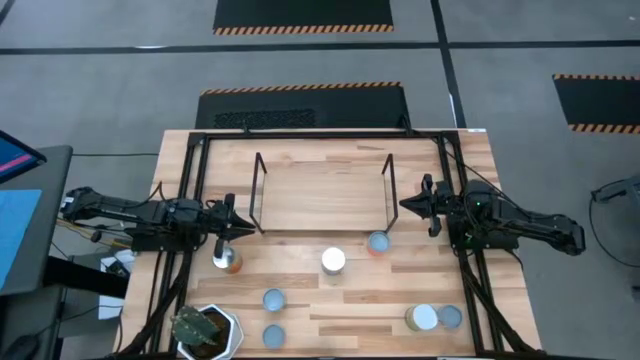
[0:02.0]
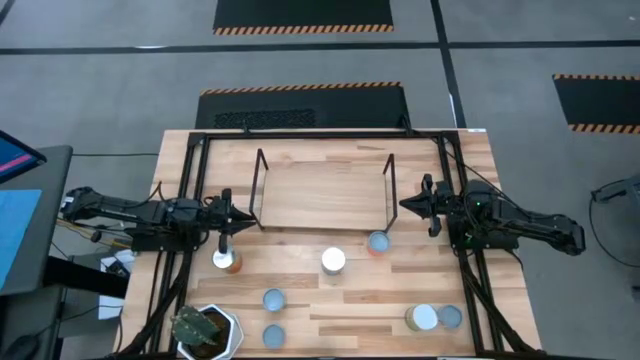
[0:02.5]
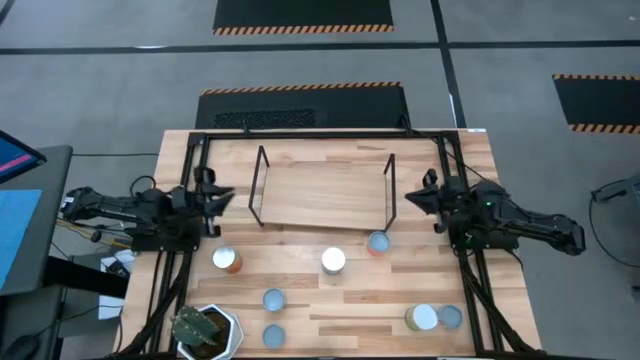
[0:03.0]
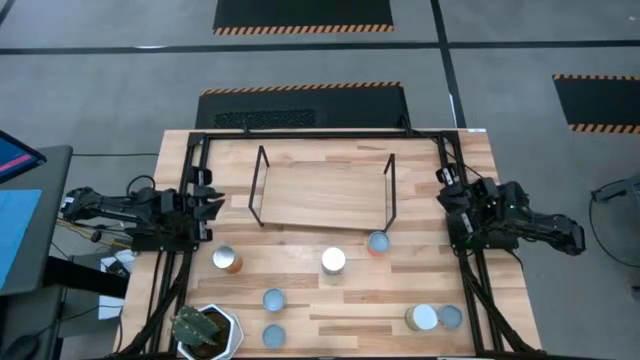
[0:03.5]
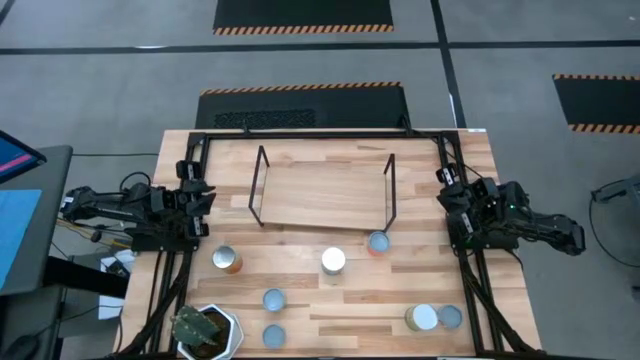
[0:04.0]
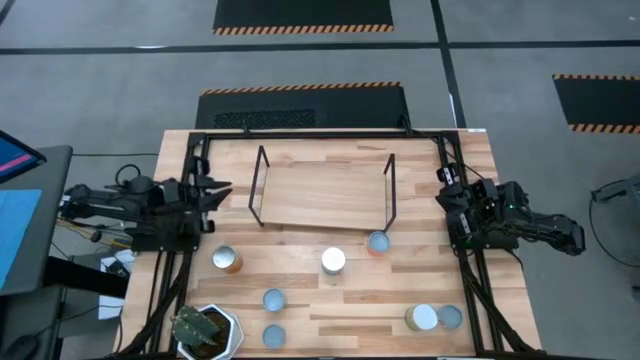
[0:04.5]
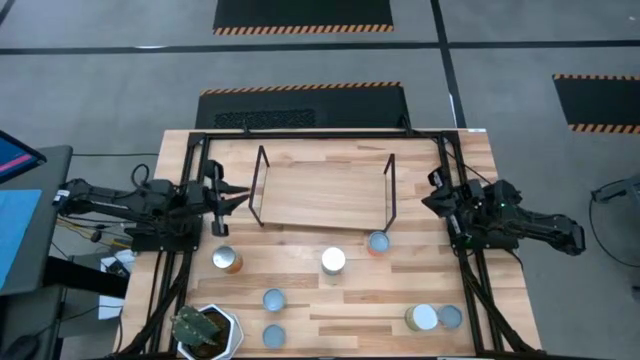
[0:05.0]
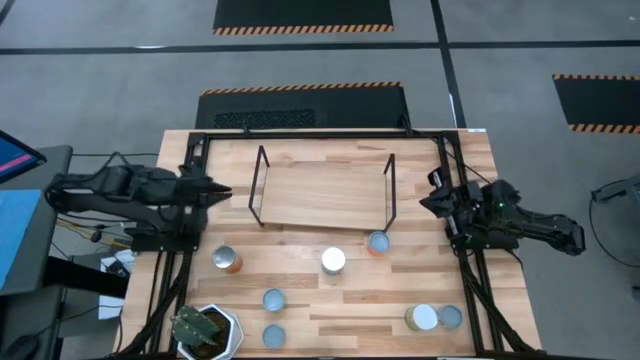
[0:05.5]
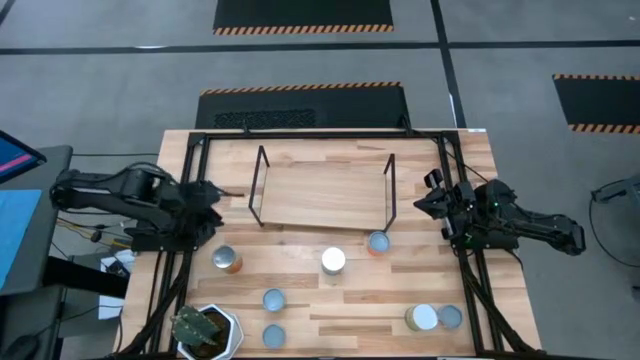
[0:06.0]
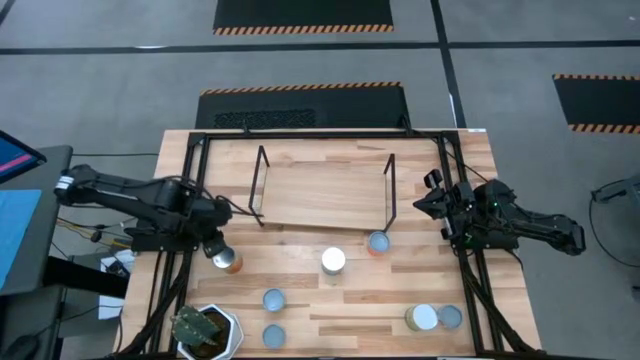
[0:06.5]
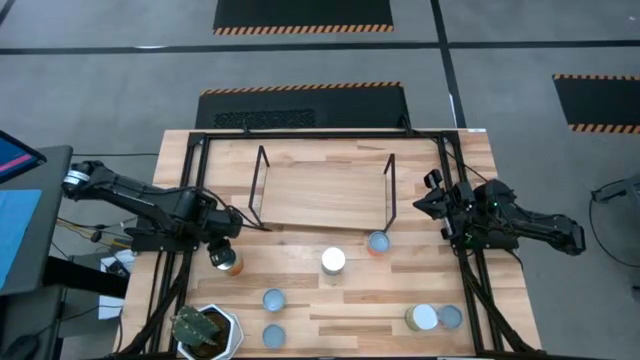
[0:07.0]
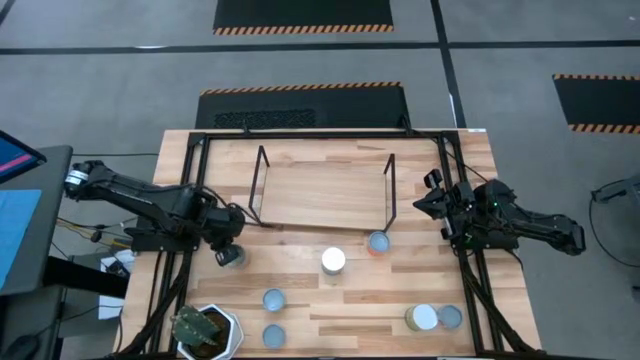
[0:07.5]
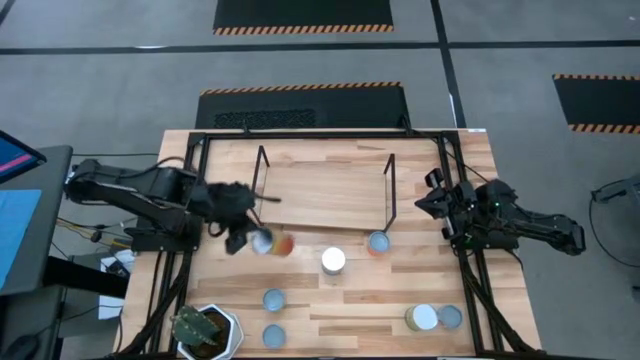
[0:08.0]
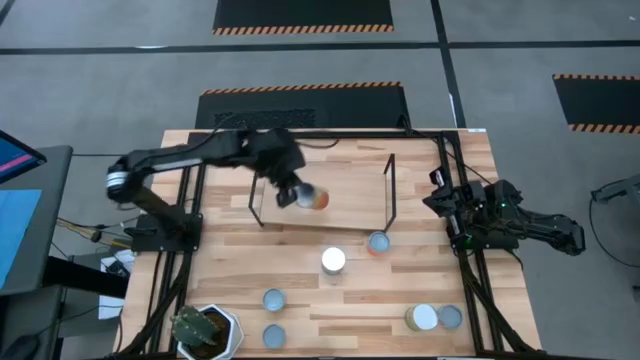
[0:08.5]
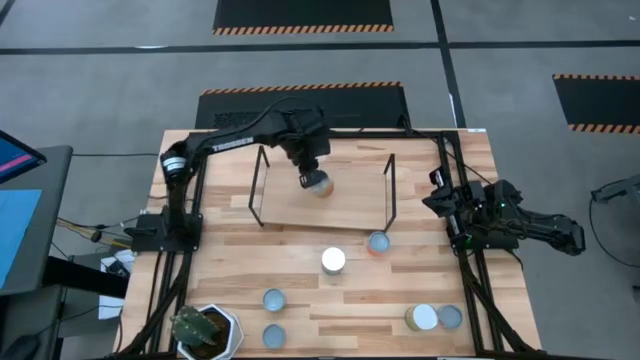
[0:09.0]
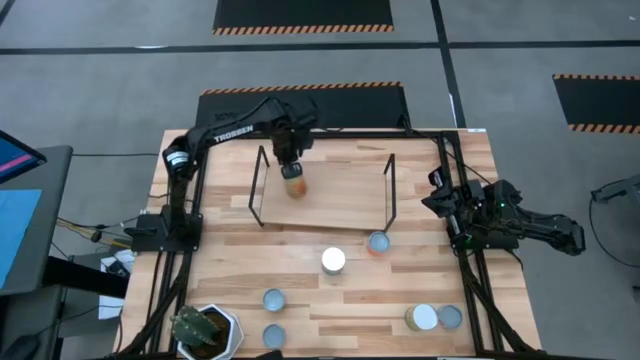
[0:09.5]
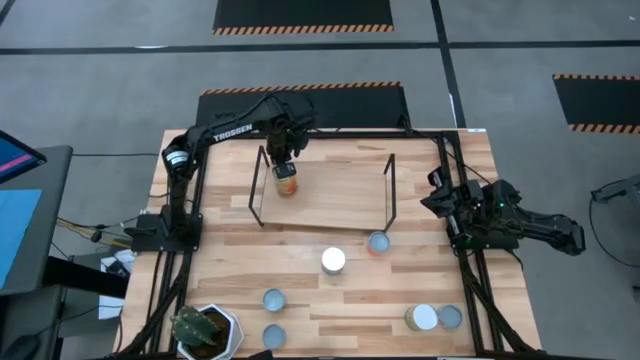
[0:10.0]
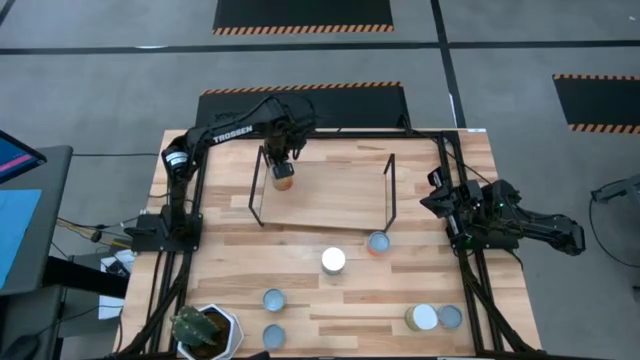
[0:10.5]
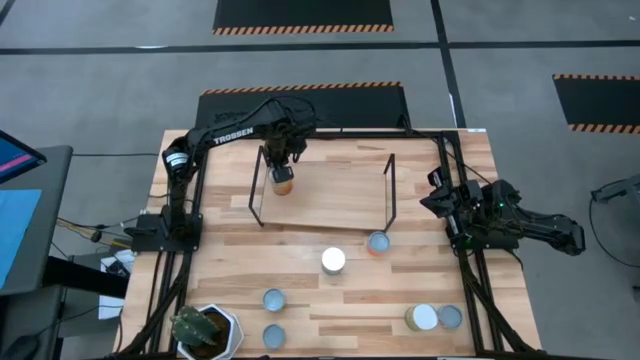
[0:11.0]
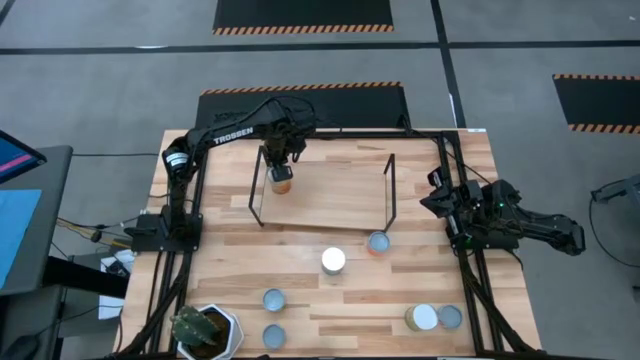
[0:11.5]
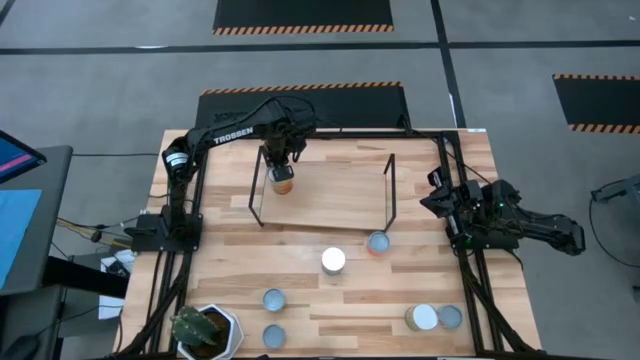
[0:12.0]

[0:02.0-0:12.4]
Task: Pick and place cans onto a shelf
Put the canned green beans on the shelf

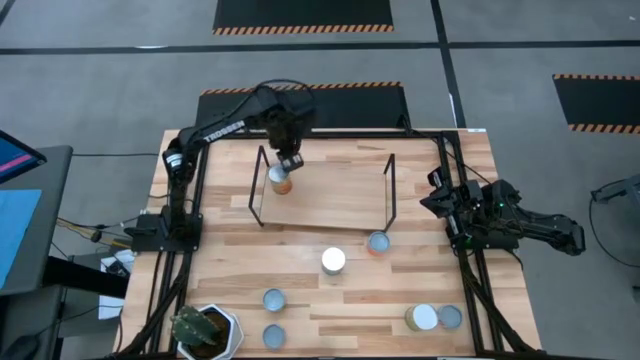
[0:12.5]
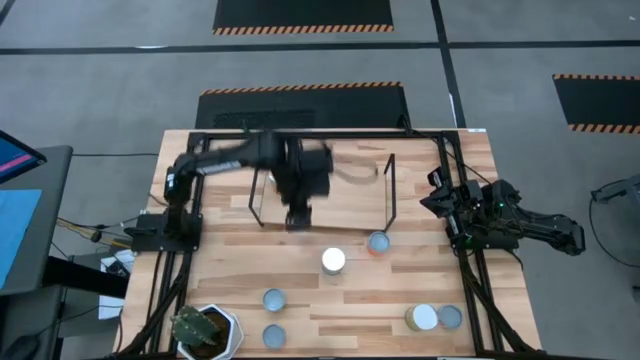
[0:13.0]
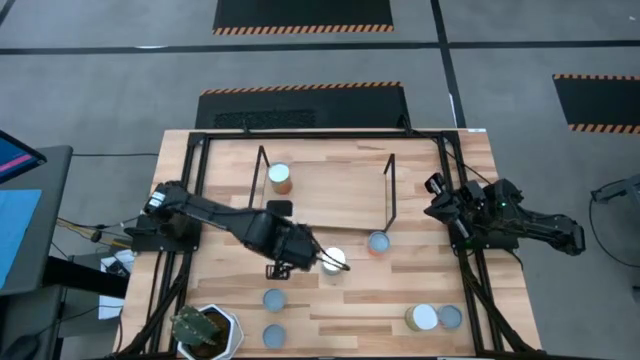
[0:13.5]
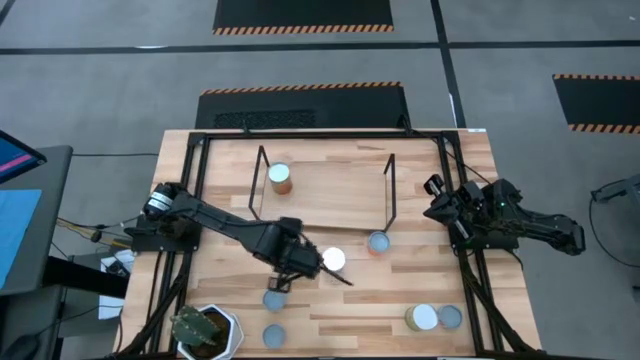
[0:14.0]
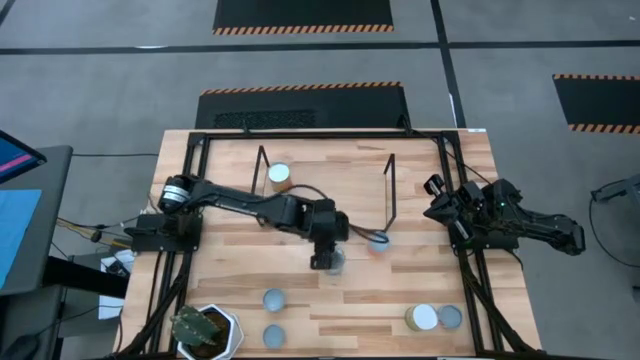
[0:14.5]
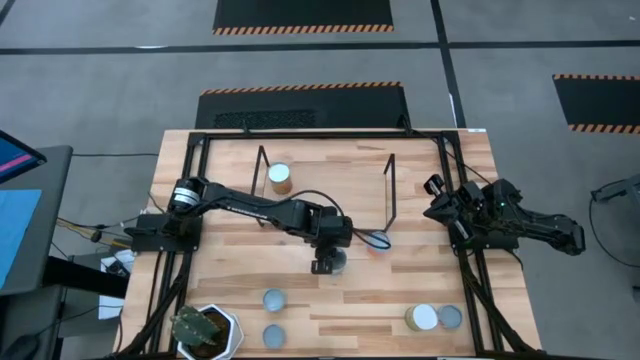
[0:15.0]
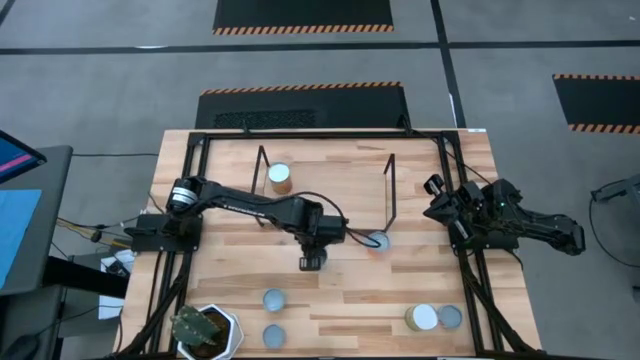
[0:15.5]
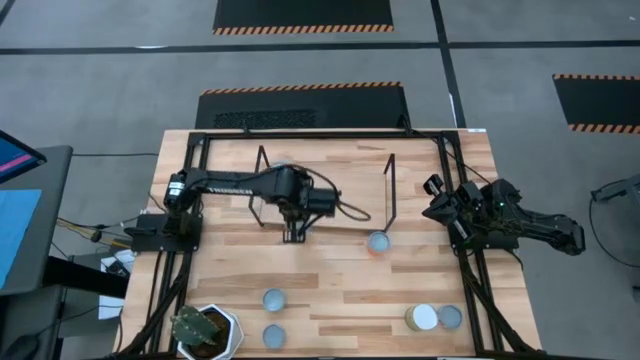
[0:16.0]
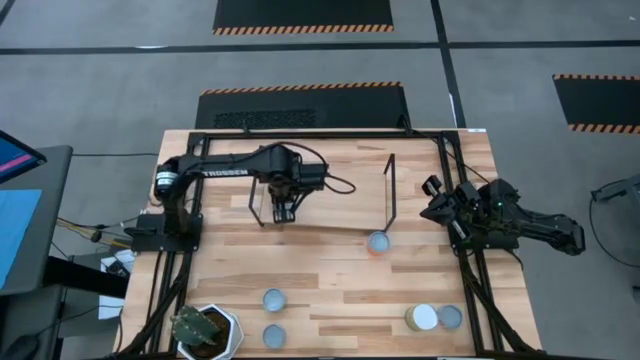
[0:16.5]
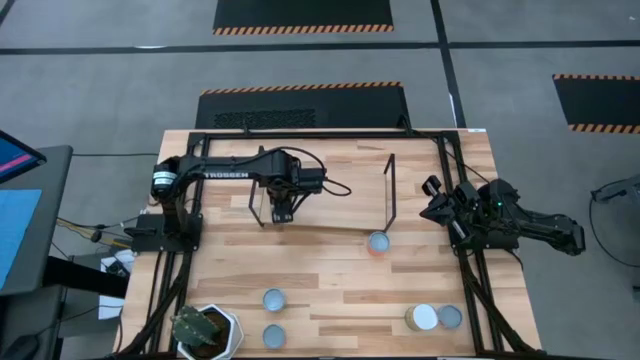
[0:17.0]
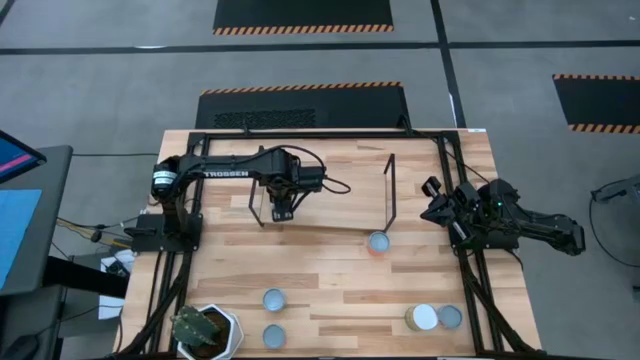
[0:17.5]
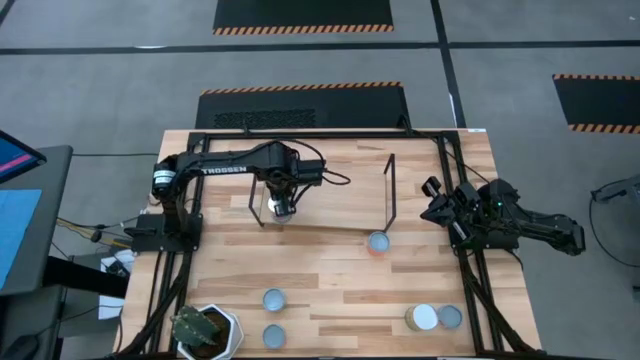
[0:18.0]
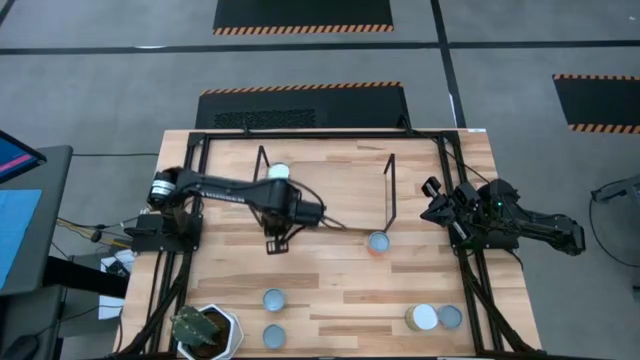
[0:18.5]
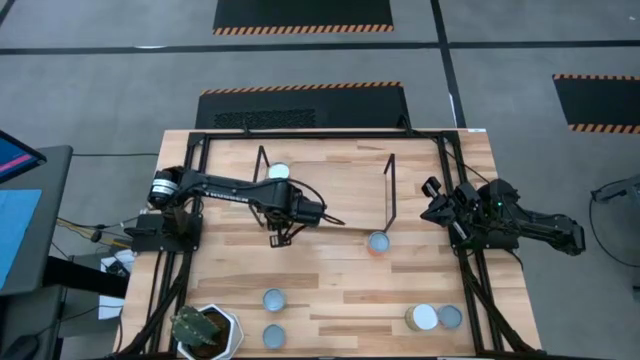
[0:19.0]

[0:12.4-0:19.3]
Put the canned tomatoes on the shelf

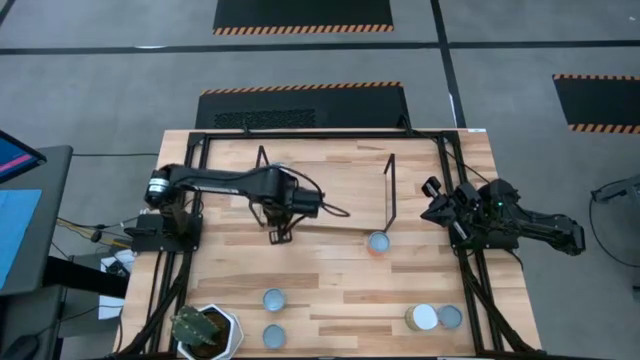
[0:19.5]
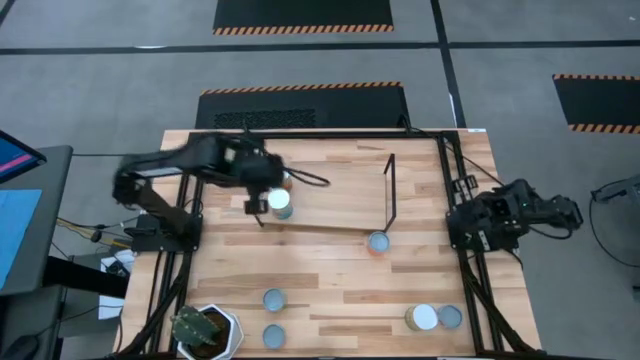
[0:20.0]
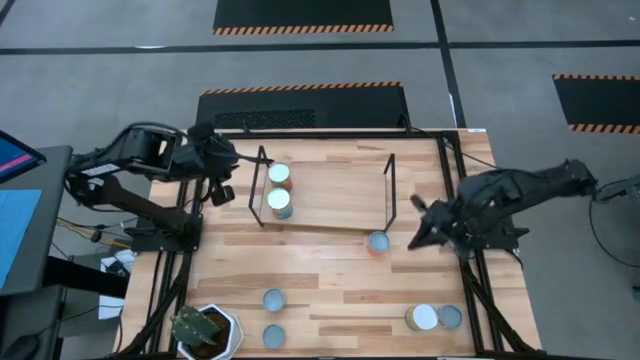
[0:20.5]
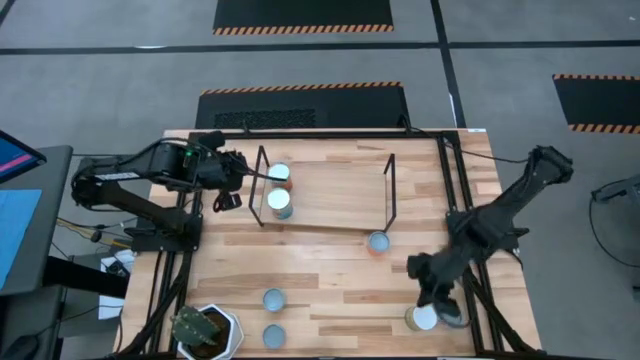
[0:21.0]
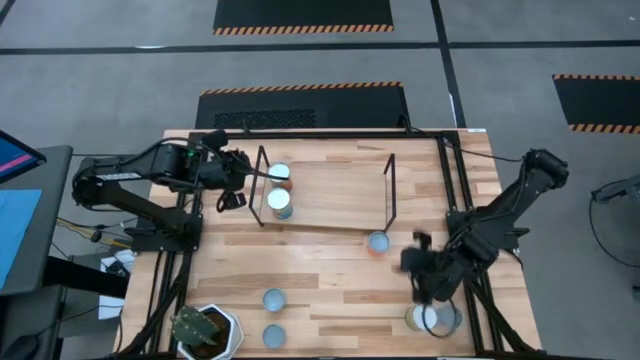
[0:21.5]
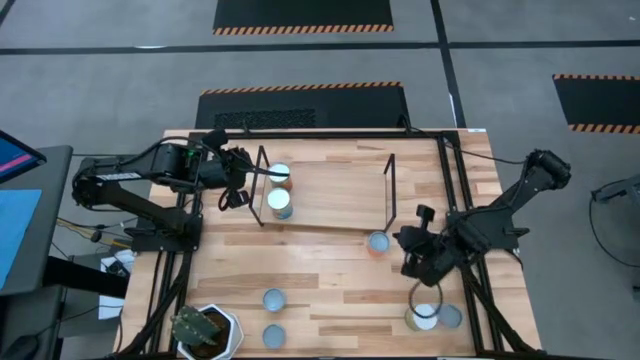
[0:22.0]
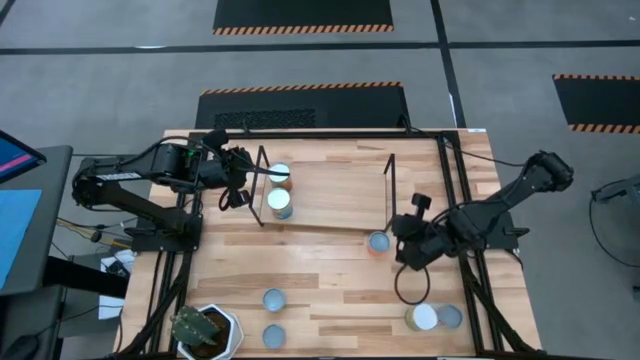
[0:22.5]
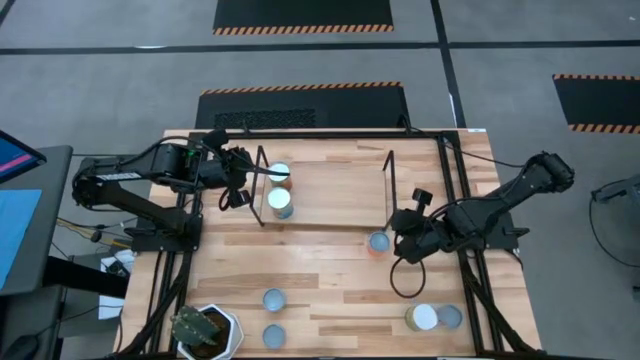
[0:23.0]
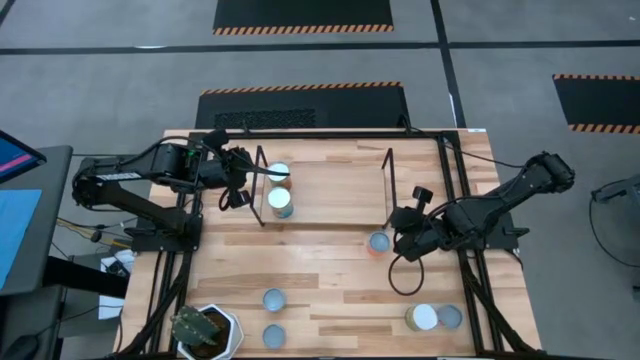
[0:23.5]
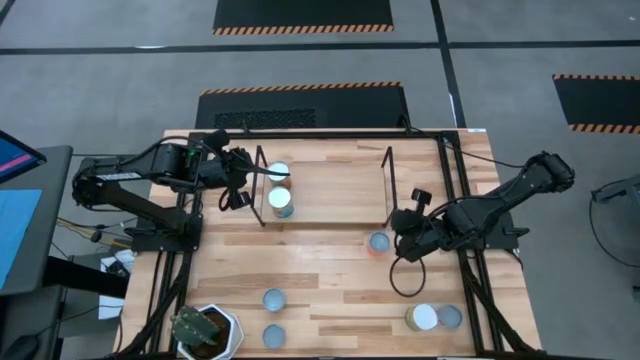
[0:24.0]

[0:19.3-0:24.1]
Adjust the shelf
